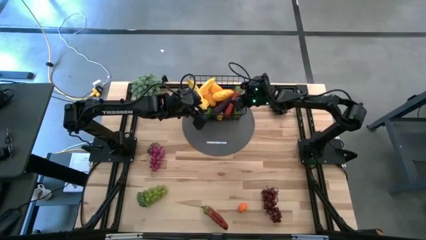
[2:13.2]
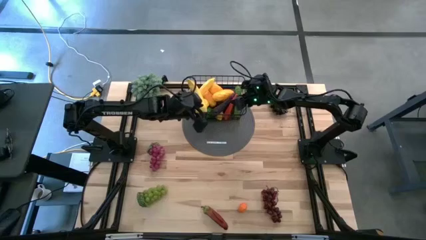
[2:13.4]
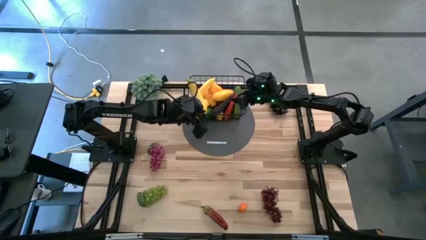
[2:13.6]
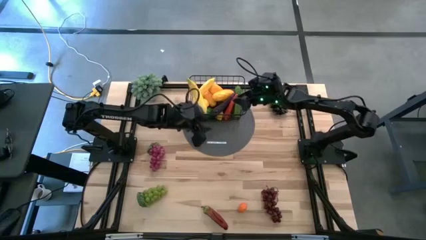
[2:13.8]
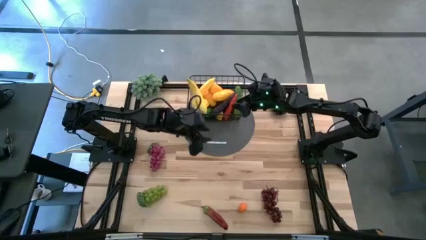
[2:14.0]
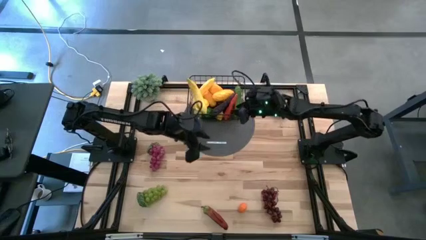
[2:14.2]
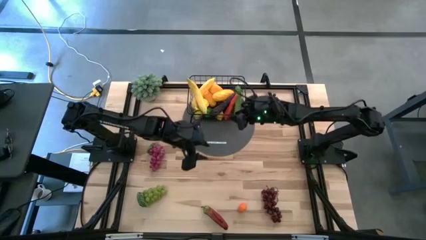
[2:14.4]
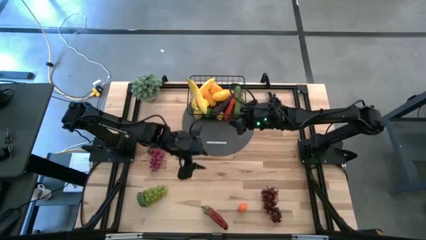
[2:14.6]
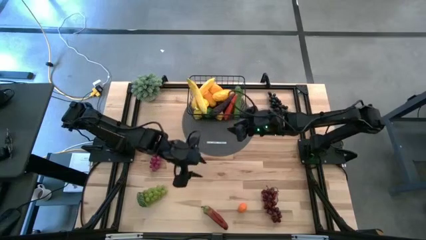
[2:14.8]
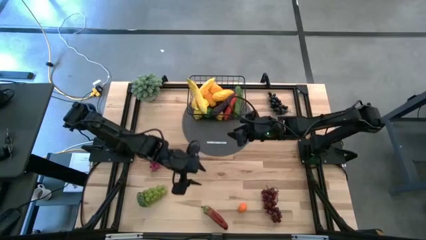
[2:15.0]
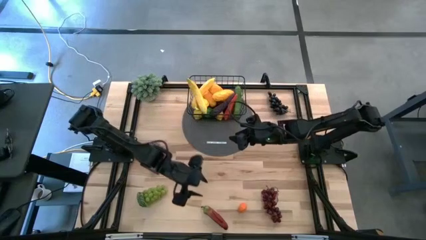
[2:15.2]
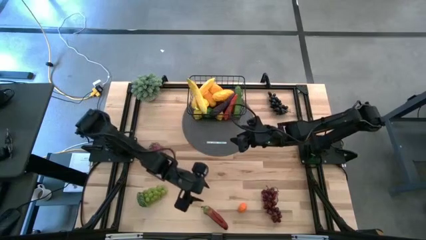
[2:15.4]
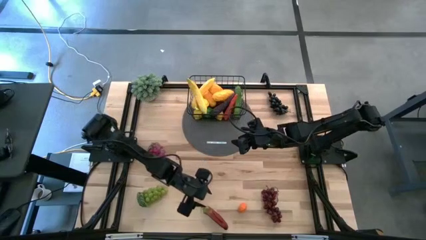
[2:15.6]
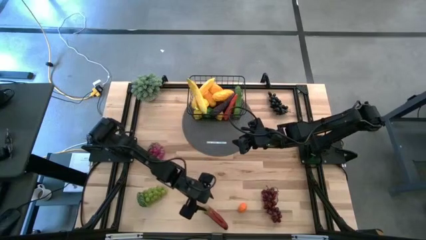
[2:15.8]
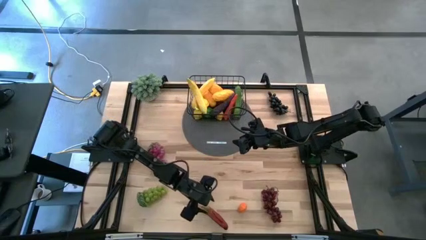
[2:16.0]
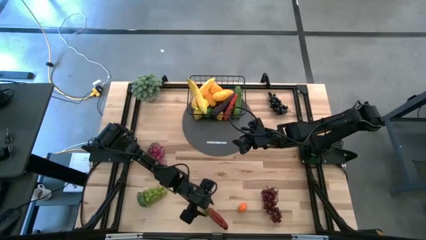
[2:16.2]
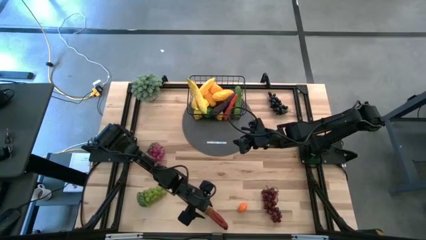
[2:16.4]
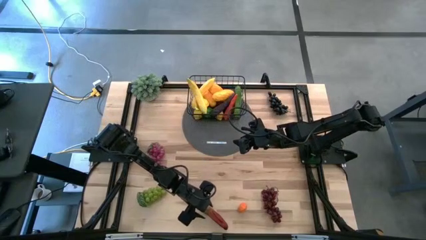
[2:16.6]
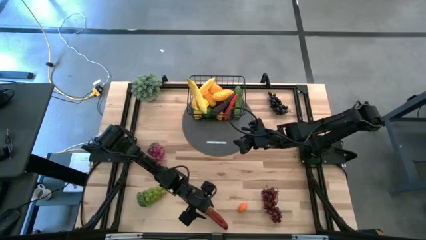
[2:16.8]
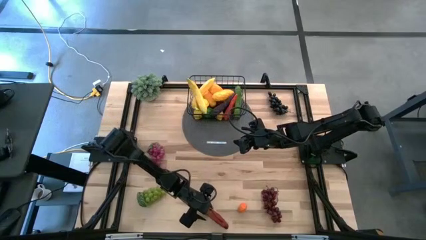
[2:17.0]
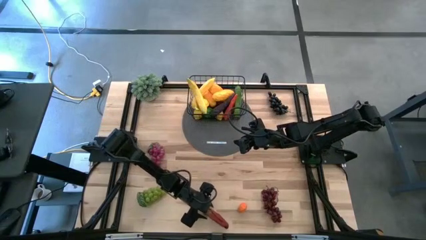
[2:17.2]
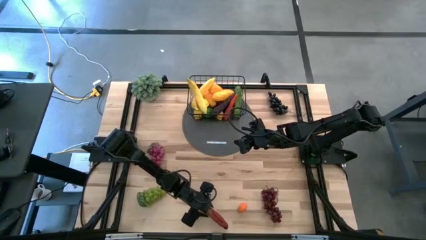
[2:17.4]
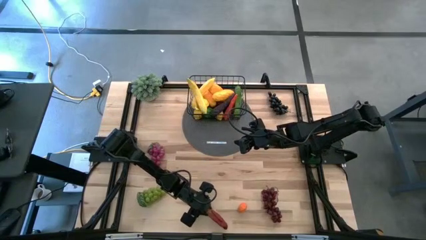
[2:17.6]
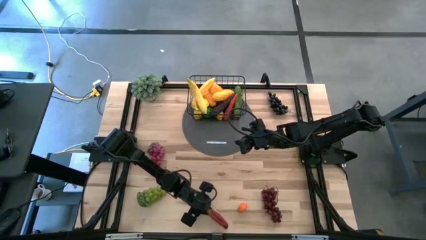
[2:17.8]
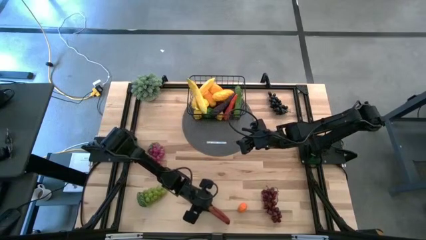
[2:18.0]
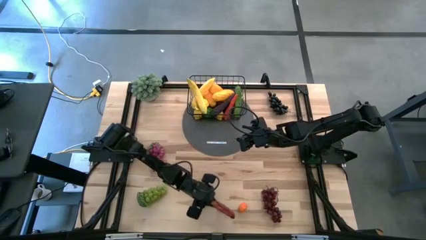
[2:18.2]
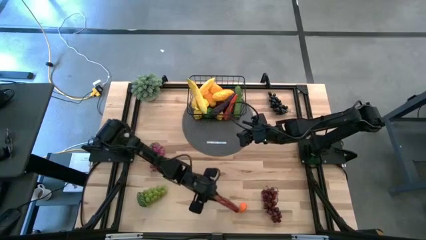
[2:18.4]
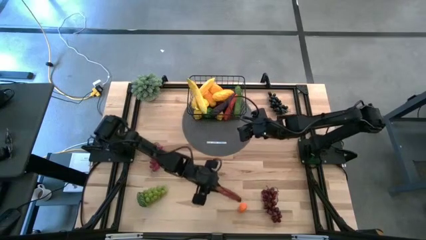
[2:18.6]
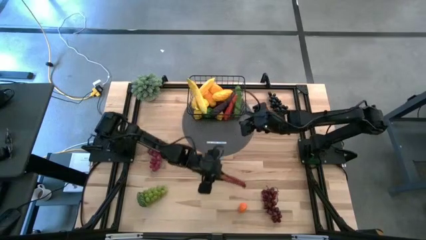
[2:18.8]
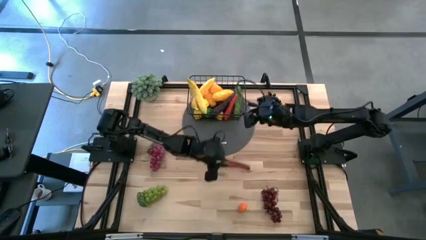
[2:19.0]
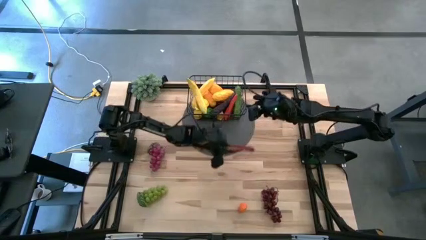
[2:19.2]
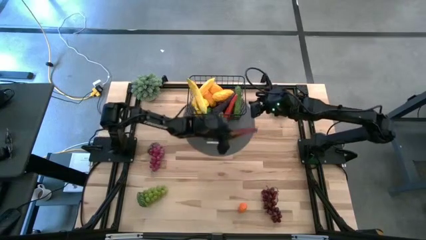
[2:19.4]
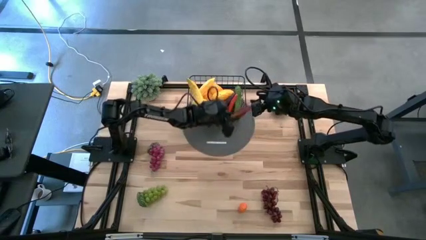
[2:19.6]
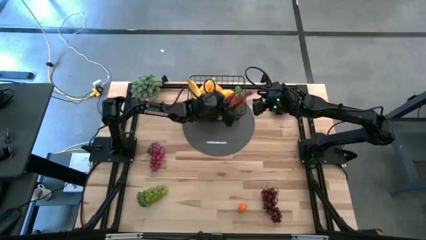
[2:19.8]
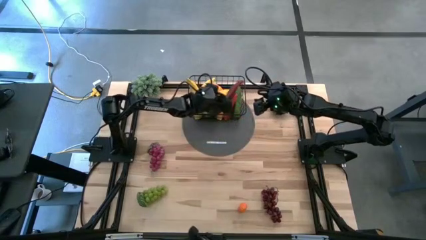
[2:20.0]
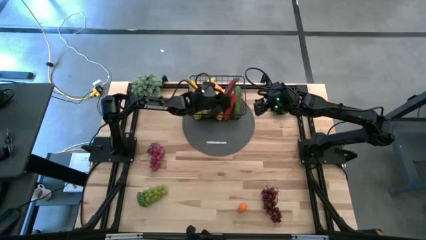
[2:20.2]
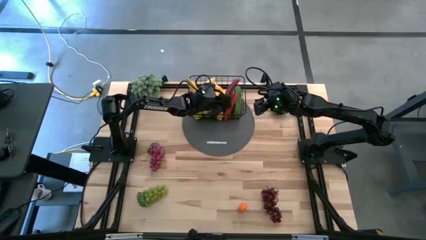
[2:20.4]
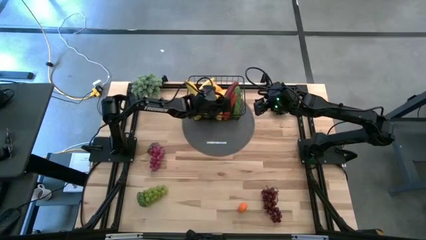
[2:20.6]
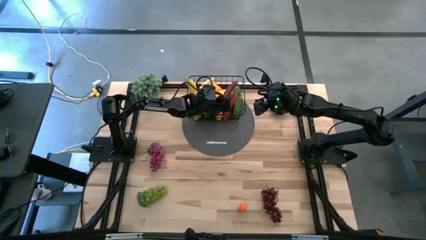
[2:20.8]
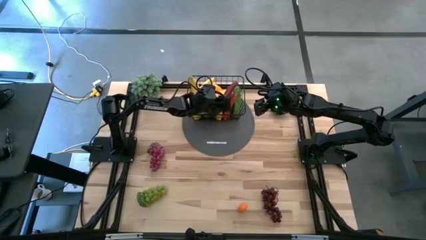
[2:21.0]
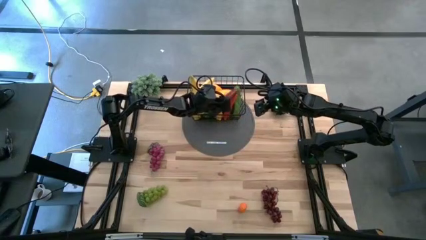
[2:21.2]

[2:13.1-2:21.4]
Task: Build produce basket
Put the red pepper into the black wire basket

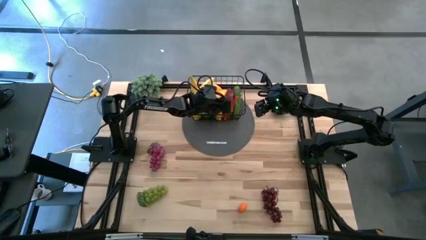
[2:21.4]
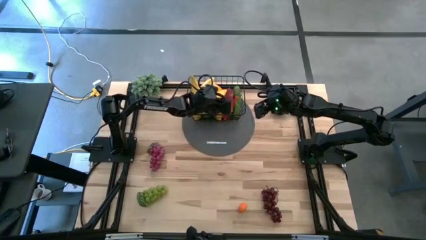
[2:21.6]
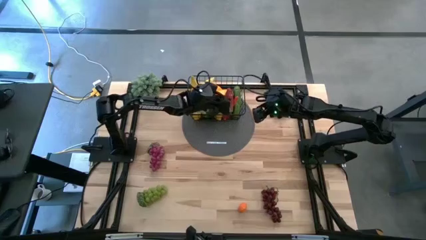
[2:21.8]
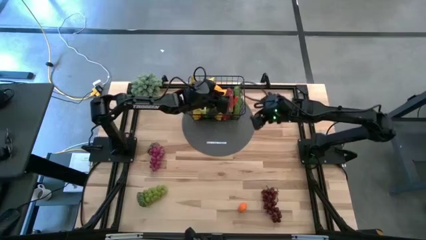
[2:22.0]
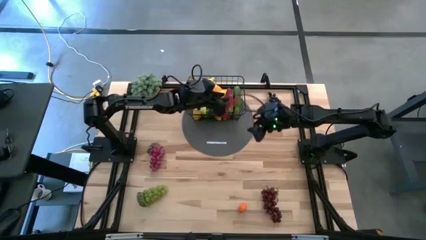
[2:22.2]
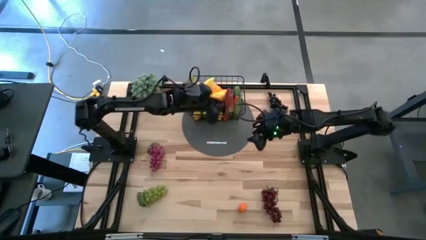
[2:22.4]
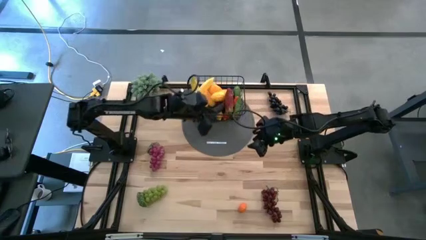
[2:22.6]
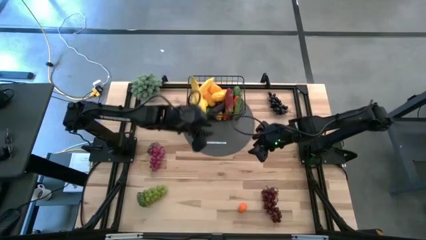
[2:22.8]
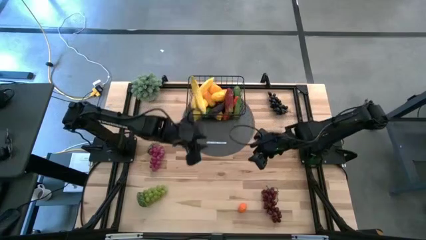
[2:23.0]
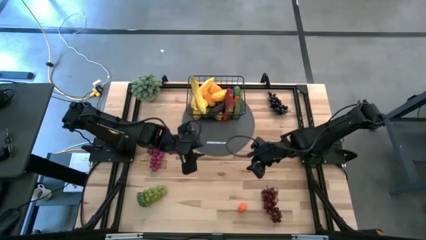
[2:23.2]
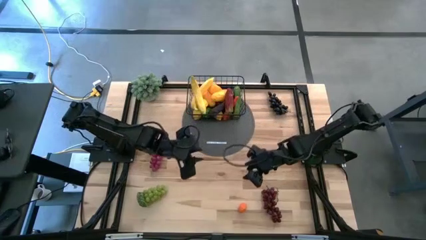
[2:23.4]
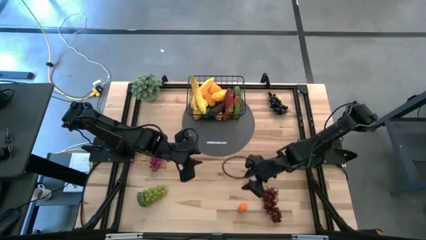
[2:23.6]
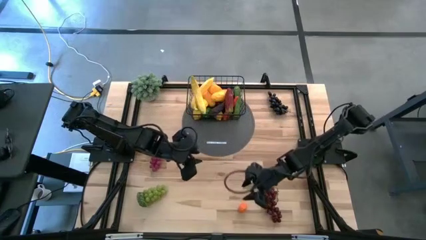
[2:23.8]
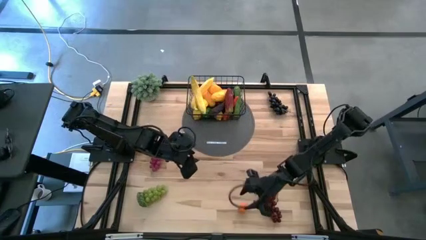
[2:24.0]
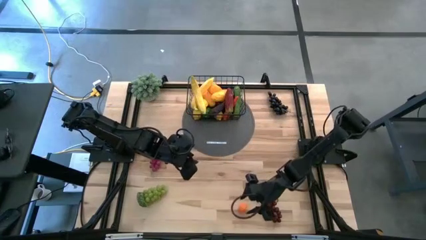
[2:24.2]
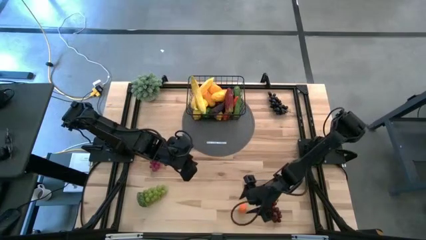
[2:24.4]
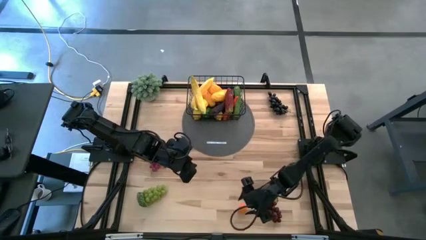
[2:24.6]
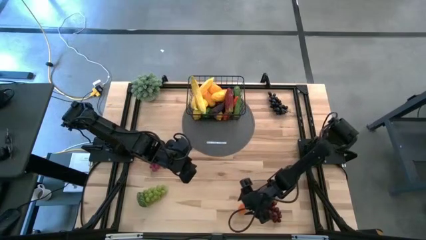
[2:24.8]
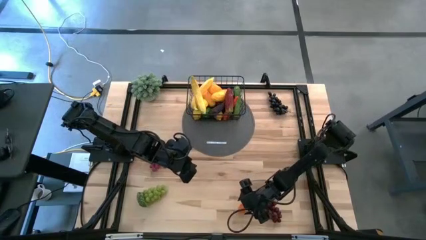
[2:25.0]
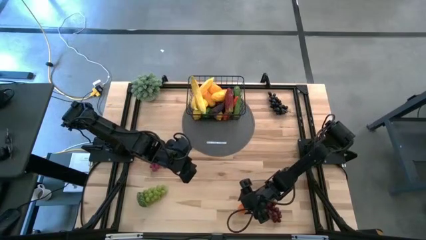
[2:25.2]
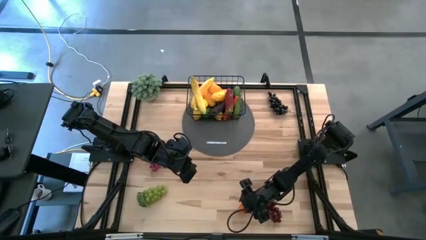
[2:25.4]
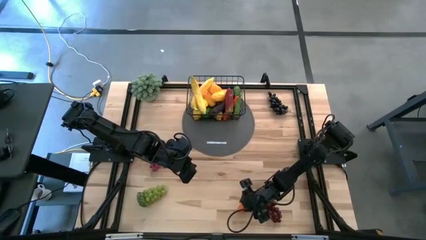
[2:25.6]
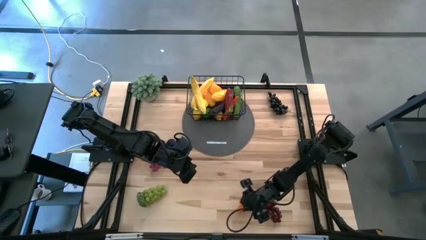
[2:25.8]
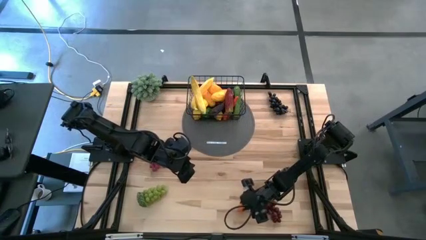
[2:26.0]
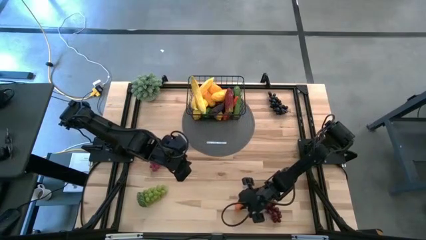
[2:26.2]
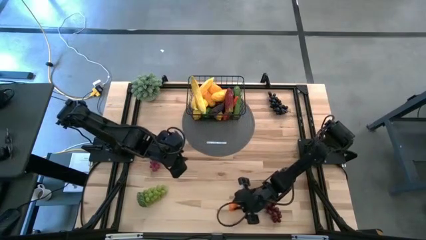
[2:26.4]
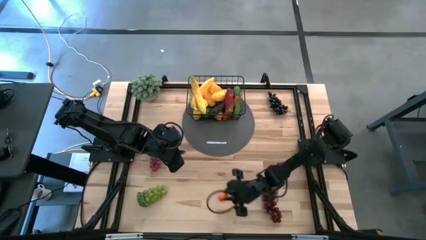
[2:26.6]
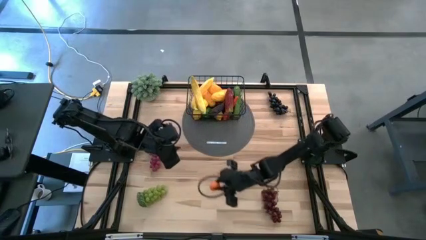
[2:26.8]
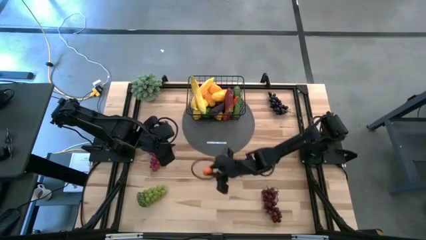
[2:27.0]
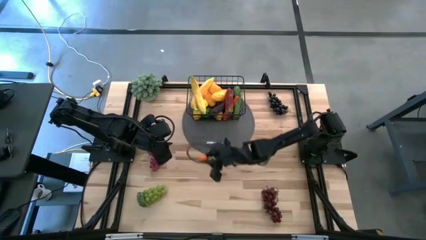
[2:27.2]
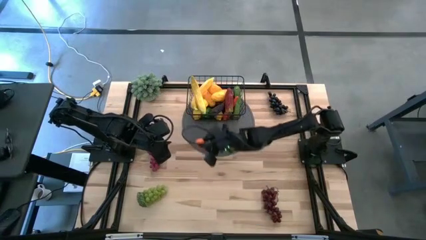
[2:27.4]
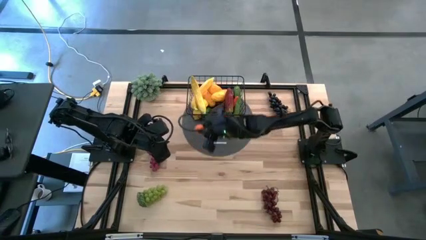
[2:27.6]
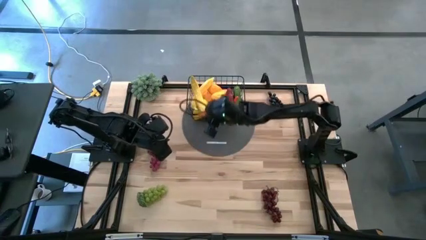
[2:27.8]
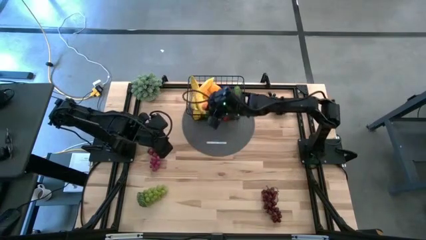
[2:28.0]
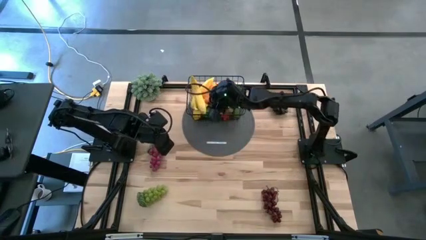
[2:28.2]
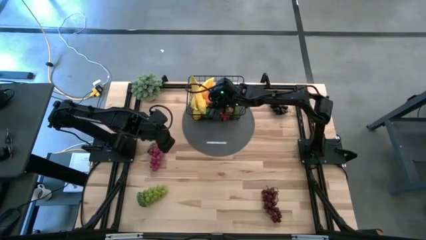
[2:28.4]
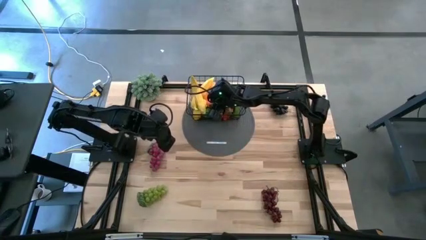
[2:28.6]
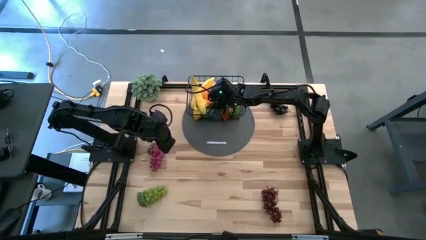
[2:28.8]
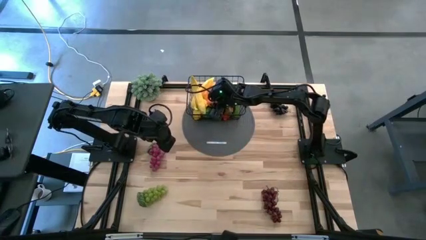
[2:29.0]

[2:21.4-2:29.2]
Put the orange into the black wire basket
